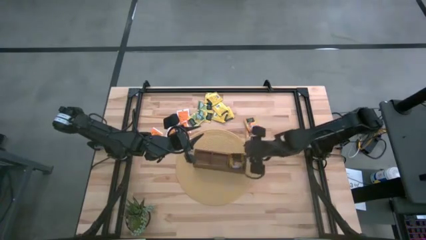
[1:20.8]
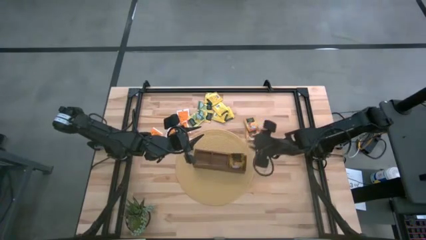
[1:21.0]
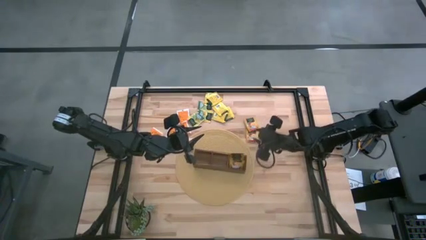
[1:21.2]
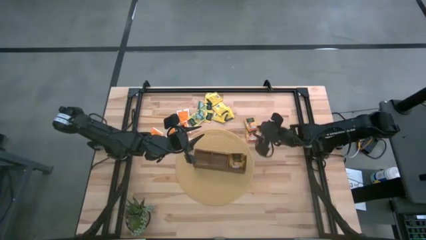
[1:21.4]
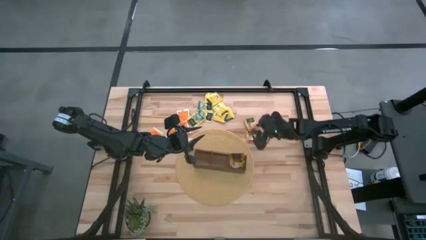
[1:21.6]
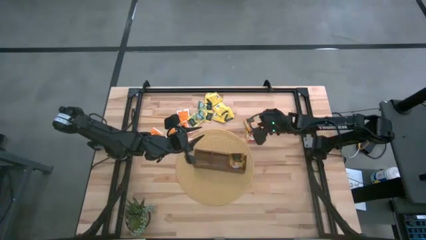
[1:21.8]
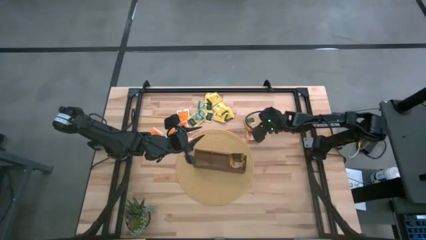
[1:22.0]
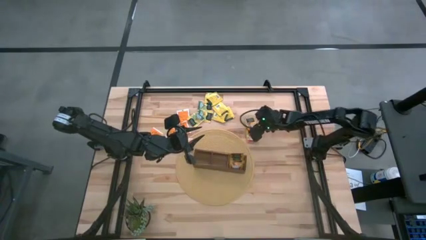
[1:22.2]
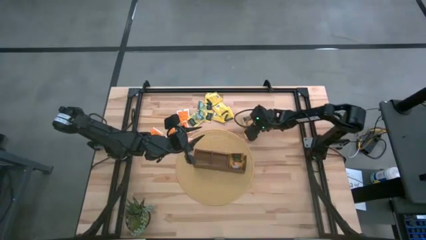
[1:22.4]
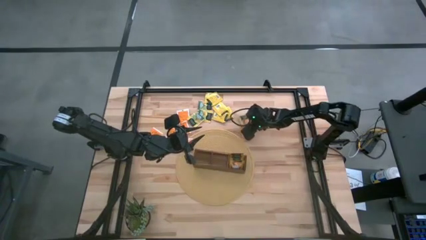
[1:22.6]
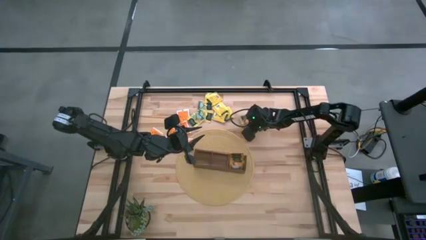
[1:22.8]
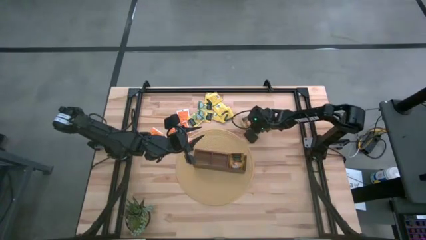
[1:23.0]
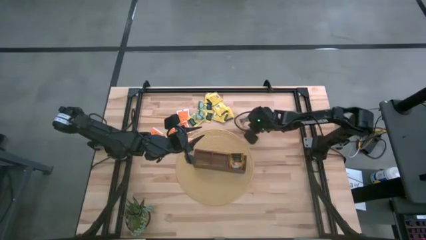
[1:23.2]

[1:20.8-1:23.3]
Task: Pick & Place Tea
Put the orange and green tea bag into the wooden organizer

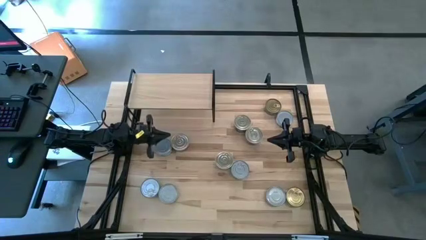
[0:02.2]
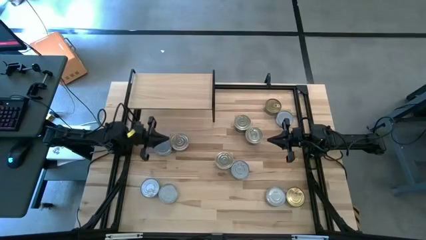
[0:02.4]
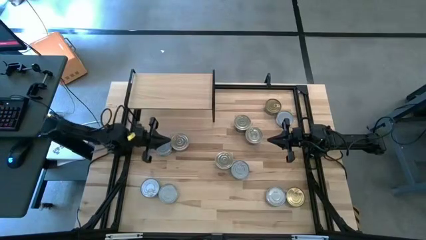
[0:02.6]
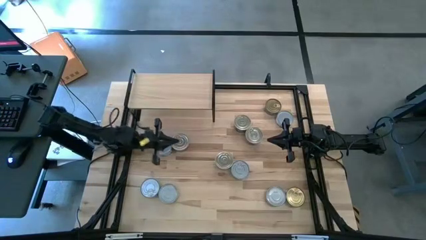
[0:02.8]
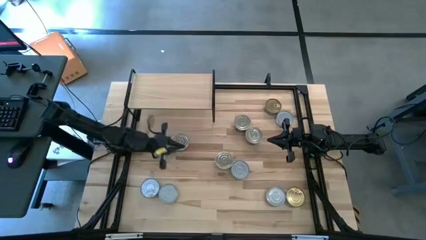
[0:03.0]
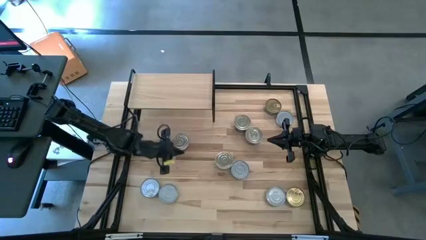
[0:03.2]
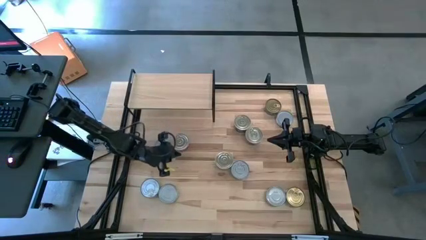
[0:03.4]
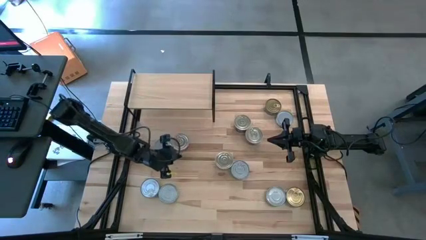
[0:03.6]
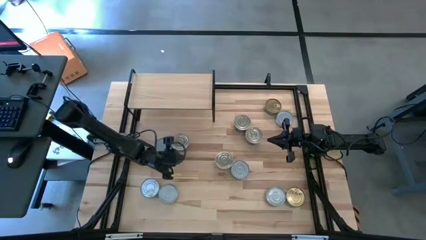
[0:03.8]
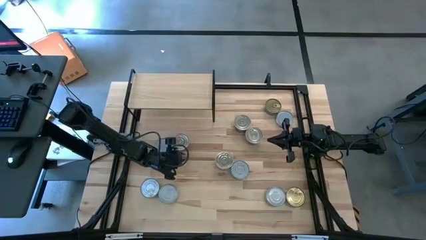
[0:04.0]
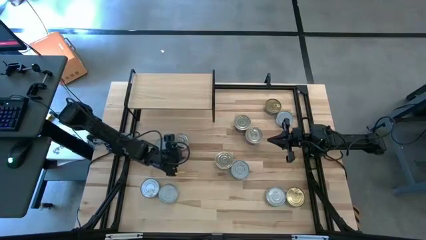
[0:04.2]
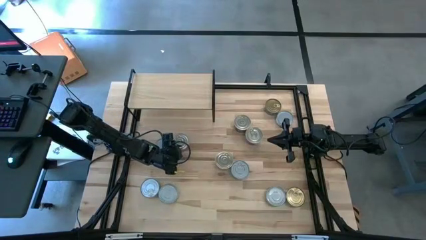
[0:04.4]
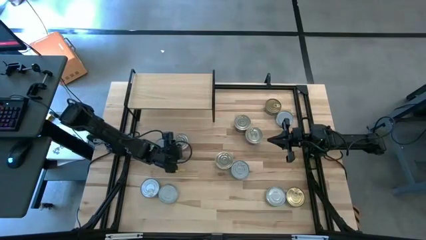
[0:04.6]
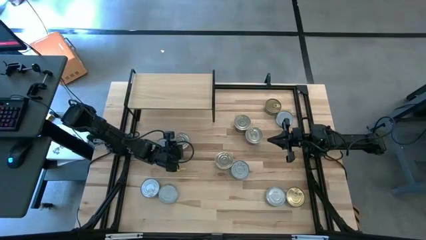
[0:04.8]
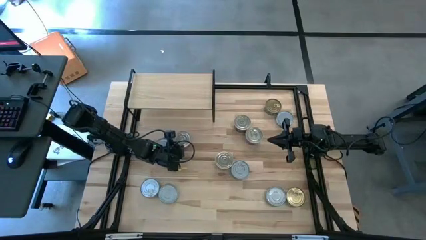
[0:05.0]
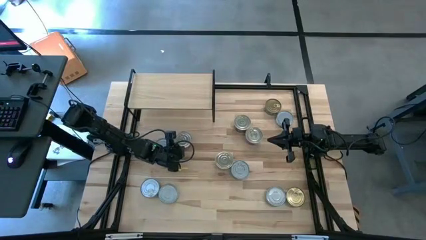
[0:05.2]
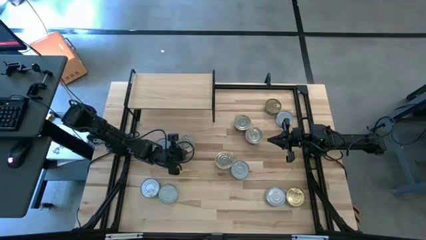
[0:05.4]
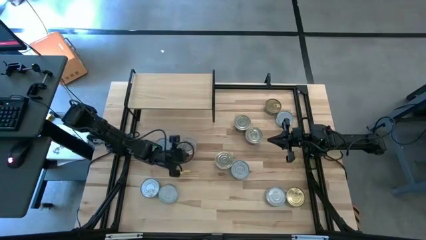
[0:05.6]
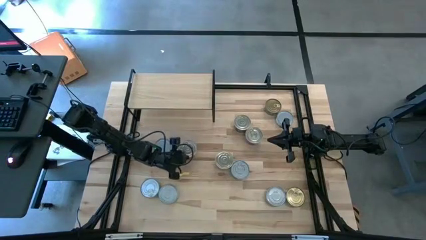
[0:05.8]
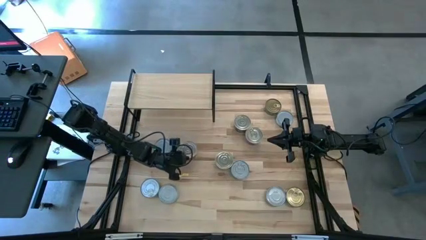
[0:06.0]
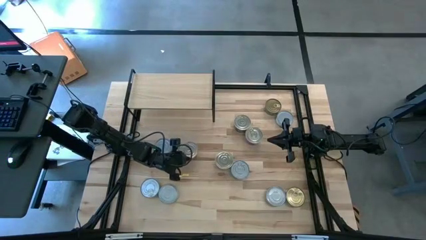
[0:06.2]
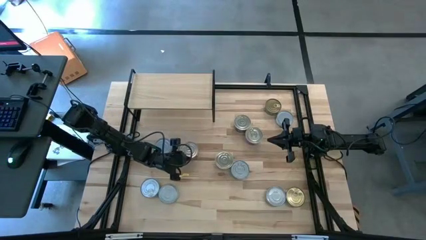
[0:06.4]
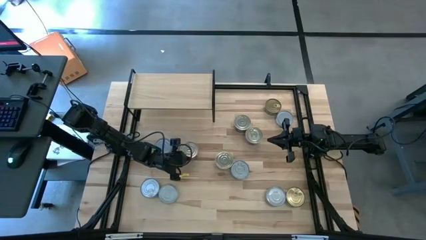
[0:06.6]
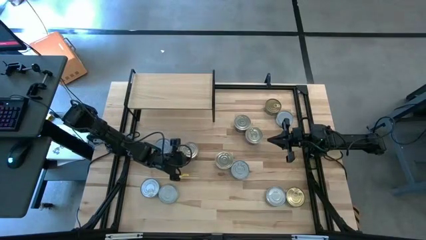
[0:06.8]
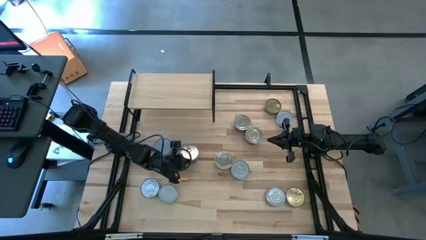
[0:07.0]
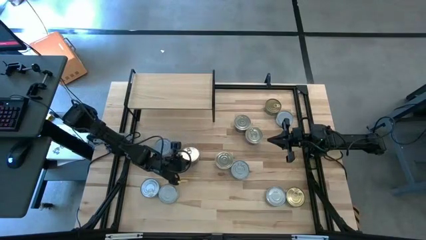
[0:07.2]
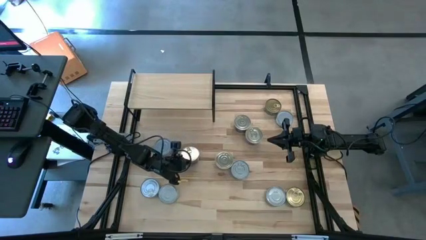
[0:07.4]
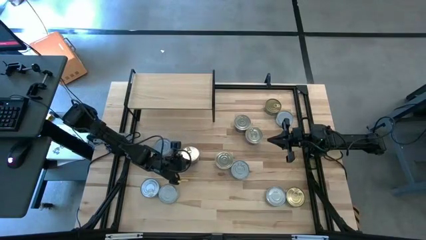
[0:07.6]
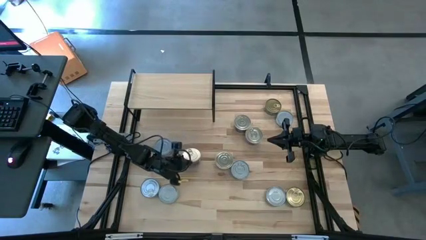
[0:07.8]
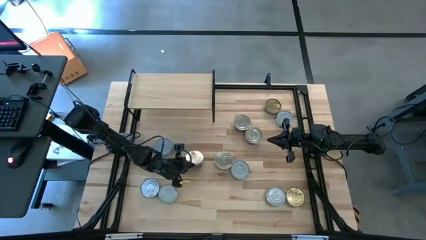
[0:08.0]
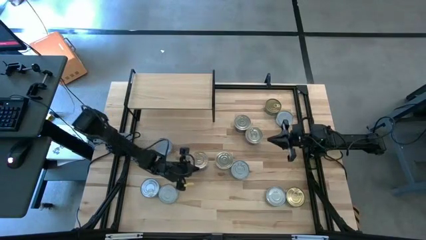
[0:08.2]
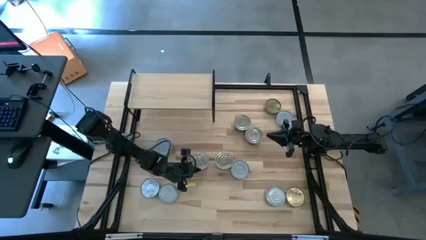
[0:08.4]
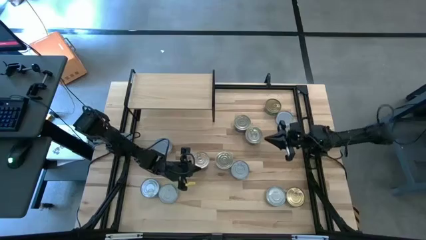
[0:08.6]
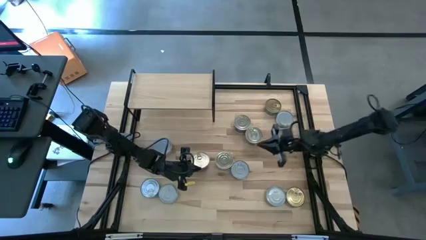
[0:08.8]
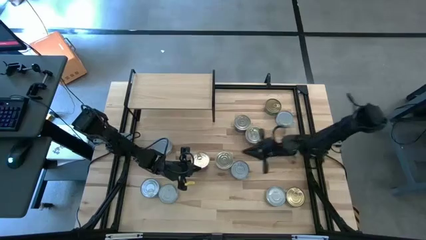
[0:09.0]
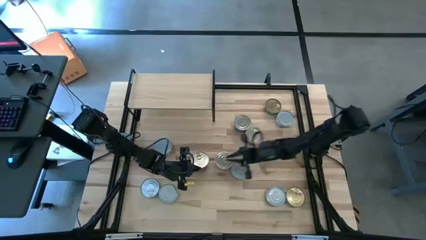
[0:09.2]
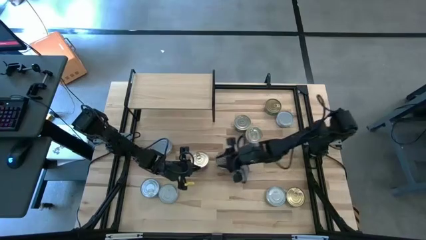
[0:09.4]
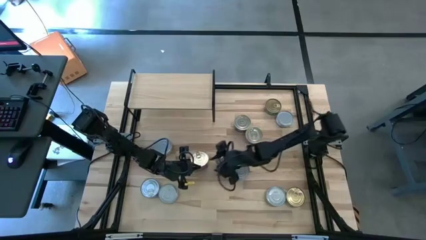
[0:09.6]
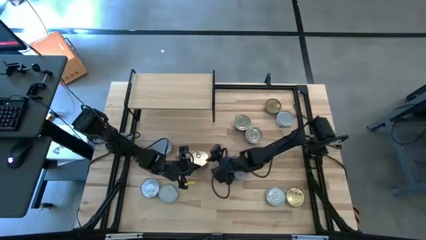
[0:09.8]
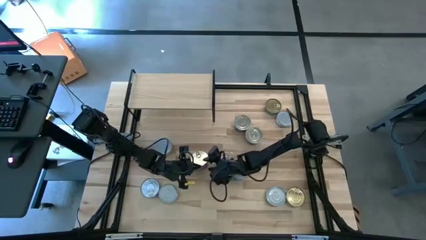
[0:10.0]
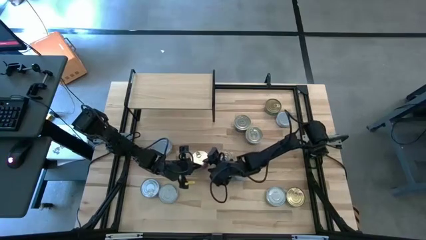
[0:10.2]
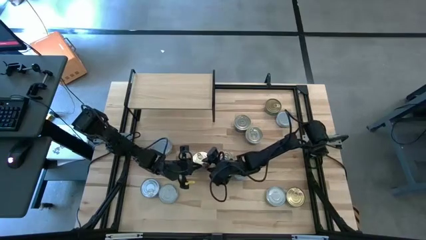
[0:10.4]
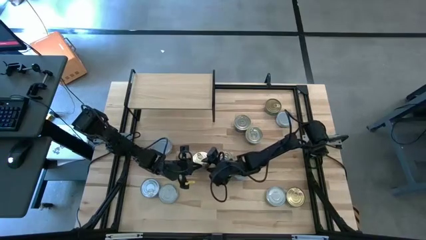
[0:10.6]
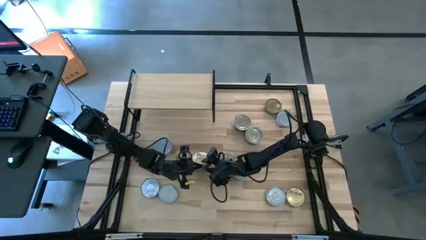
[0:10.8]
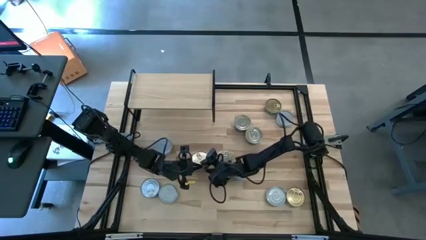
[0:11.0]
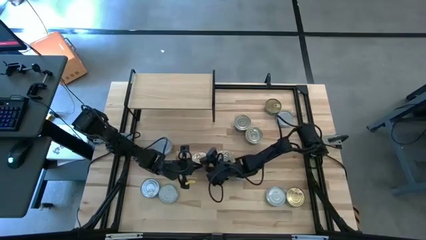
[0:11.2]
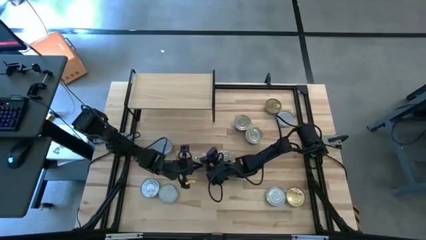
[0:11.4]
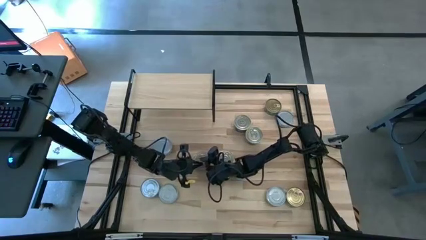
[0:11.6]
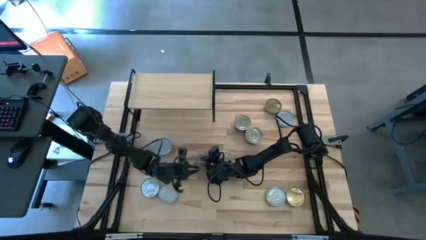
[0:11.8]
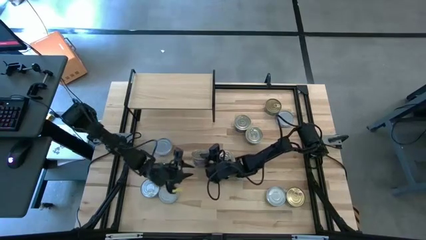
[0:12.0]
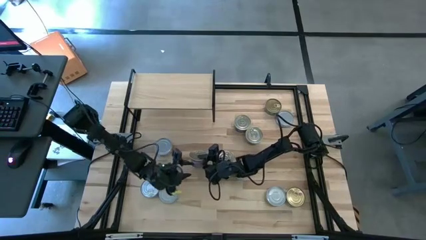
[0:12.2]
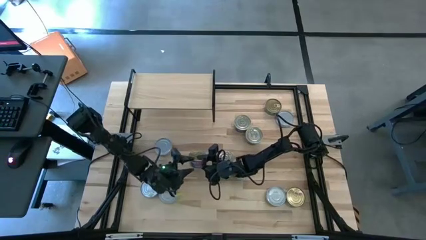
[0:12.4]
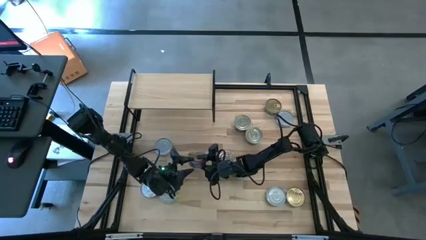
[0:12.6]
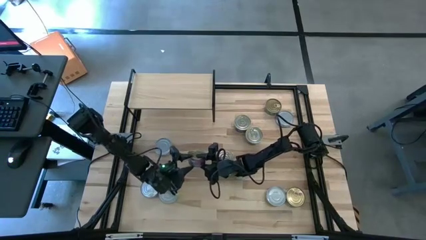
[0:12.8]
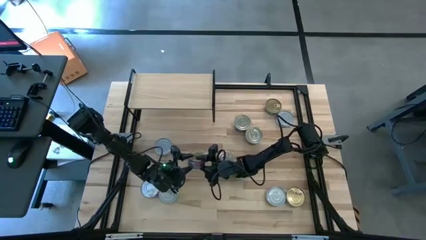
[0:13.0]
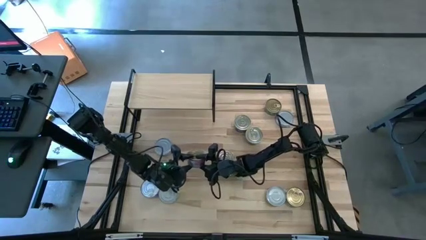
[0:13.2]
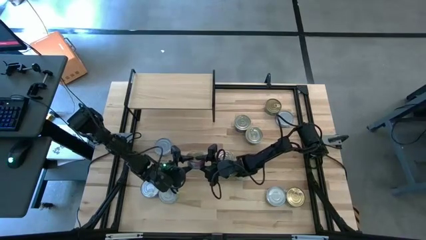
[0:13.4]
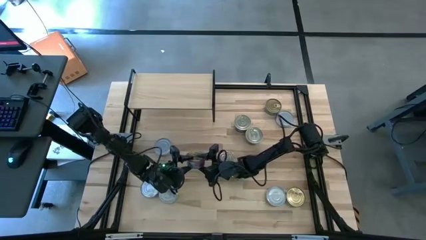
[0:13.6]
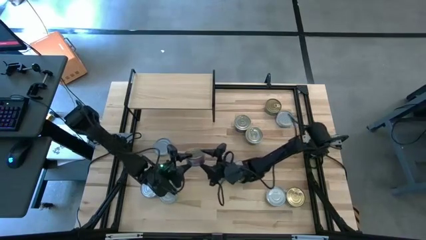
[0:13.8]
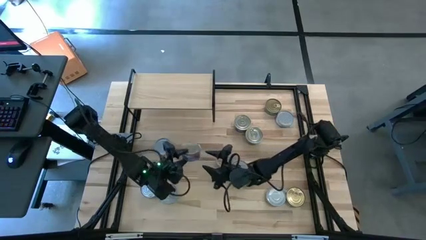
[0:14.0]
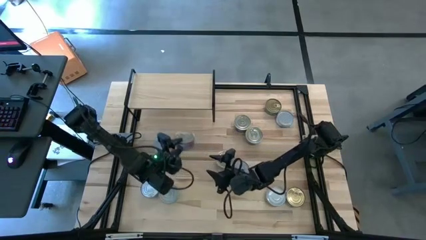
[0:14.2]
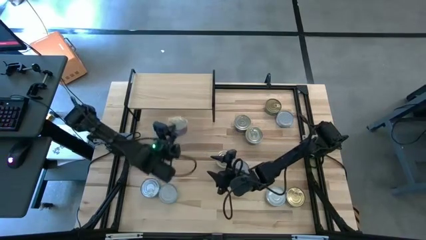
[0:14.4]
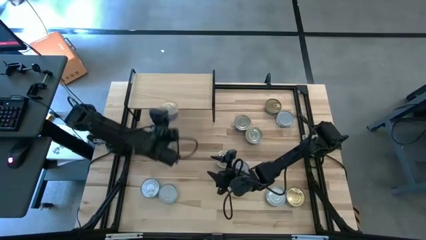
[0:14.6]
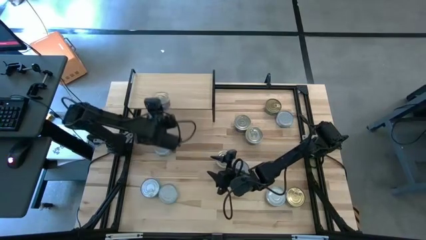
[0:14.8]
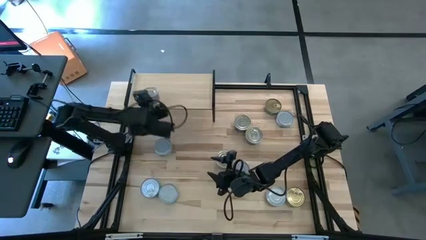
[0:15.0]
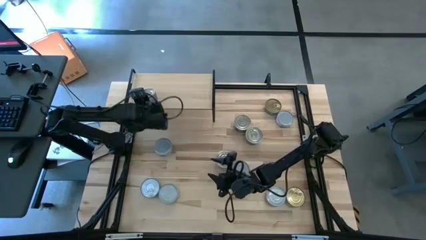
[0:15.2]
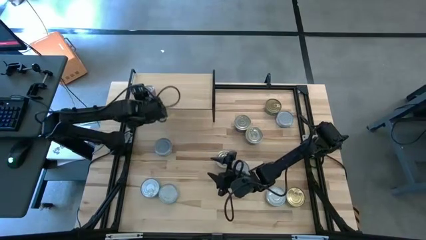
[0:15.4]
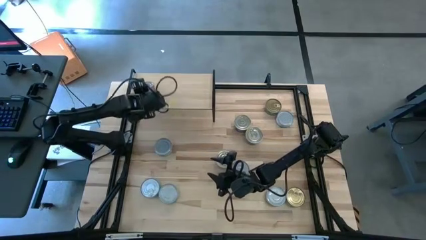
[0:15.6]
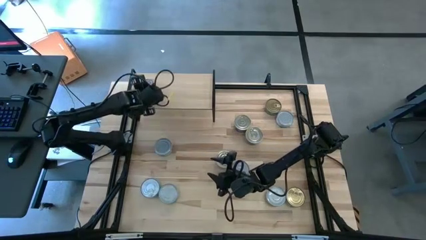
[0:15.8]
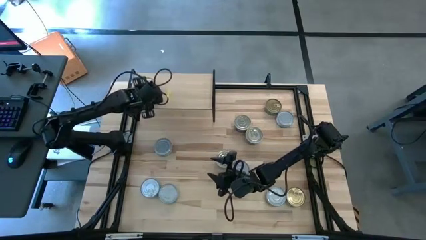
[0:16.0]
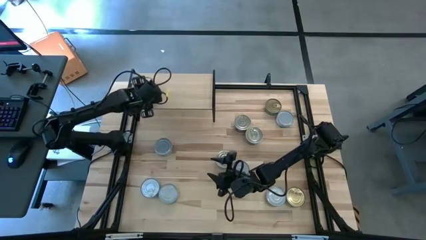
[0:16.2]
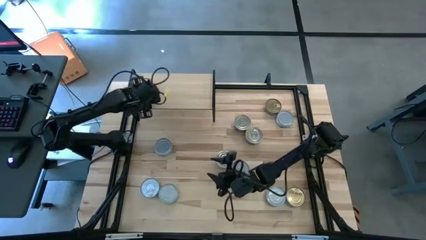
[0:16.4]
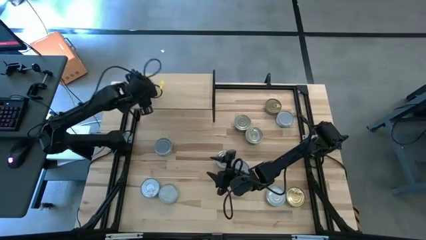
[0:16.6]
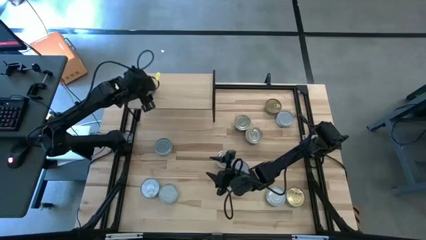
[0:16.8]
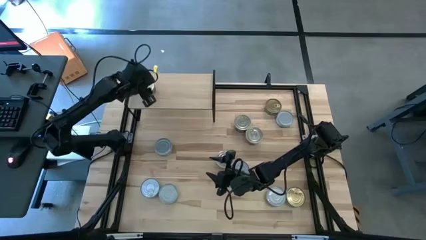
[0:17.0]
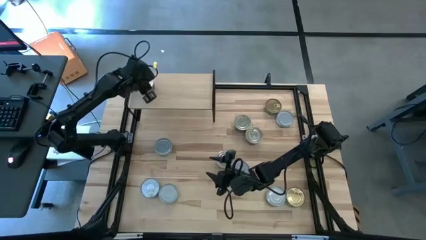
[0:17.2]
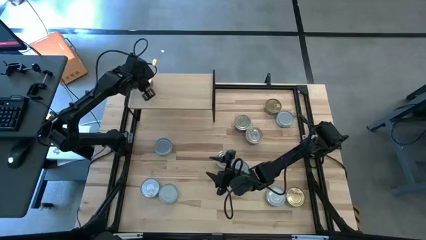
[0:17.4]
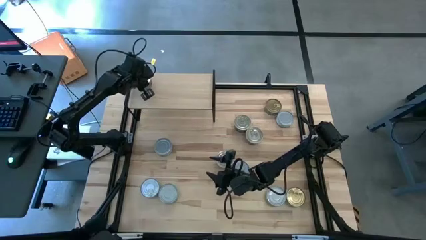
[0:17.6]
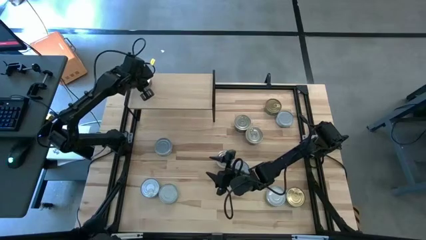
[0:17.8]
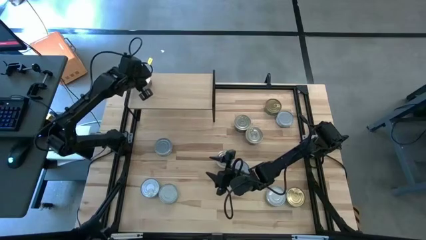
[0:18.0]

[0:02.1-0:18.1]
Task: Stack canned seafood by type on shelf
Put the blue tuna can on the shelf
